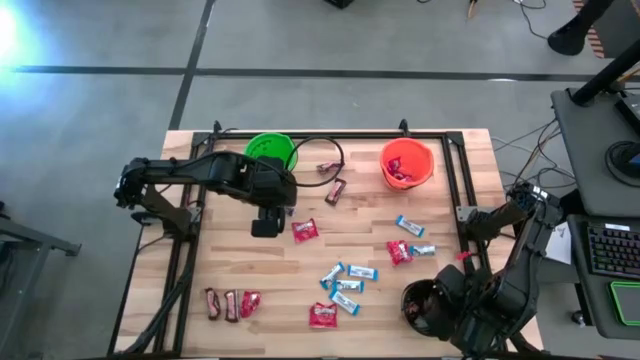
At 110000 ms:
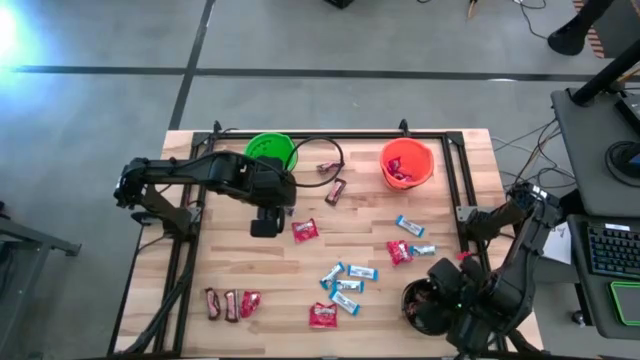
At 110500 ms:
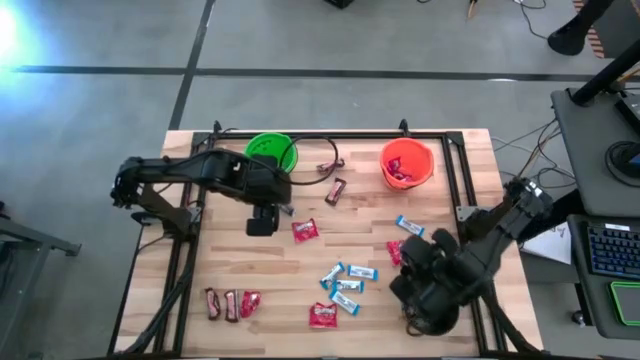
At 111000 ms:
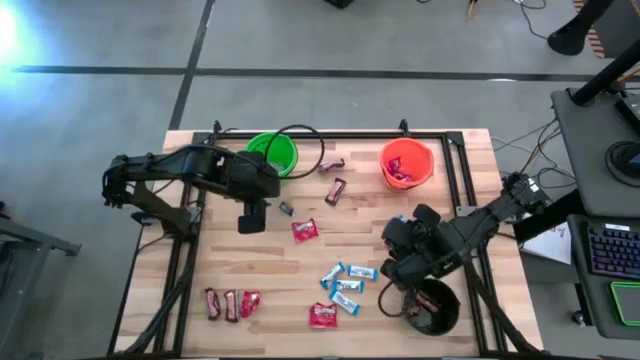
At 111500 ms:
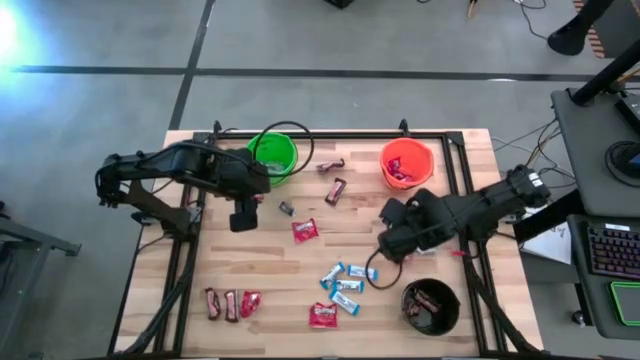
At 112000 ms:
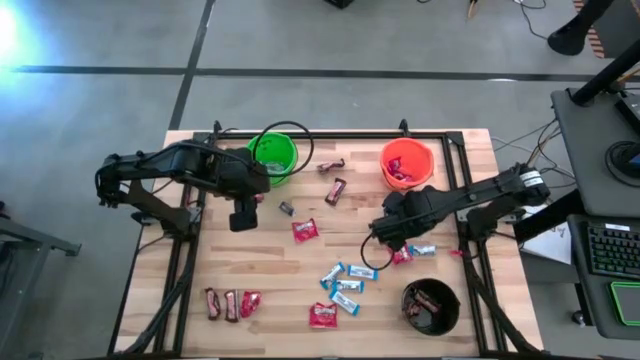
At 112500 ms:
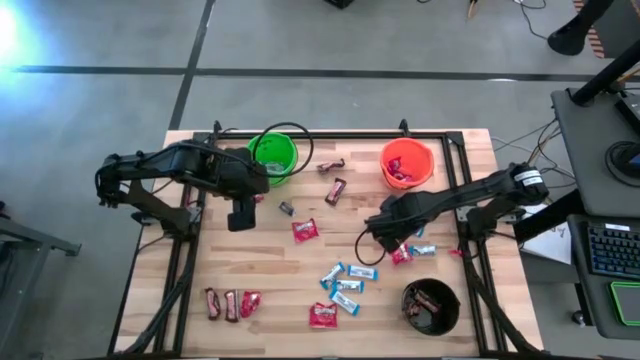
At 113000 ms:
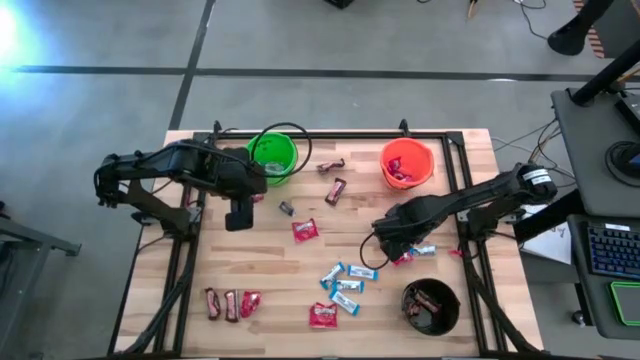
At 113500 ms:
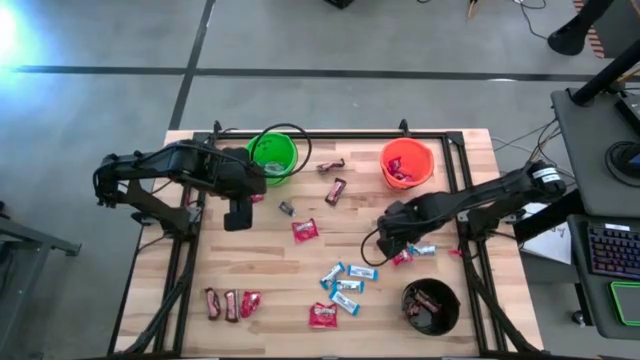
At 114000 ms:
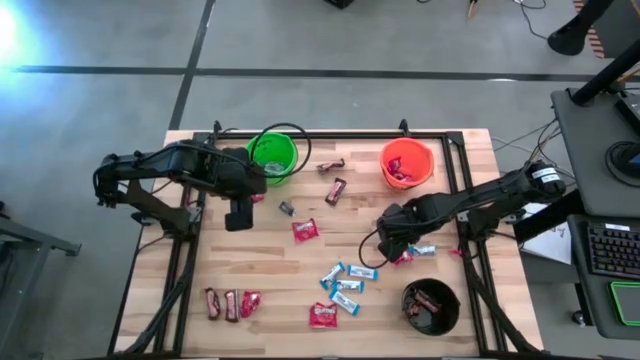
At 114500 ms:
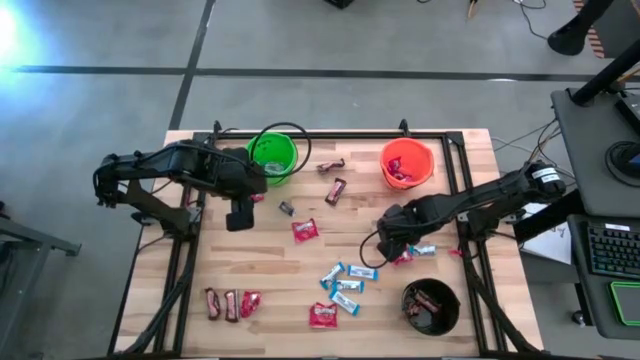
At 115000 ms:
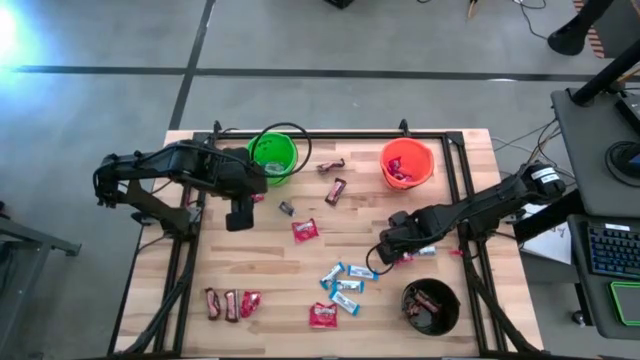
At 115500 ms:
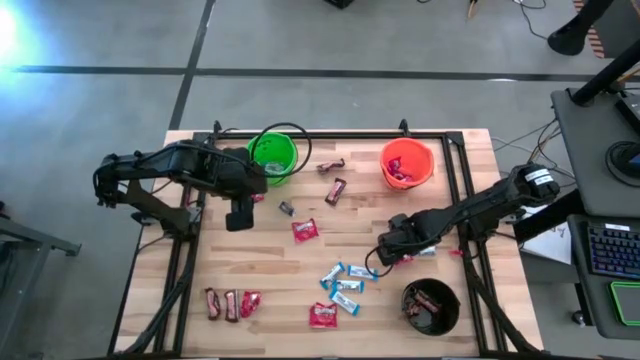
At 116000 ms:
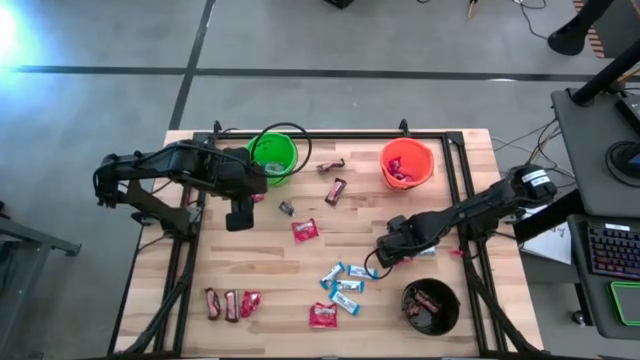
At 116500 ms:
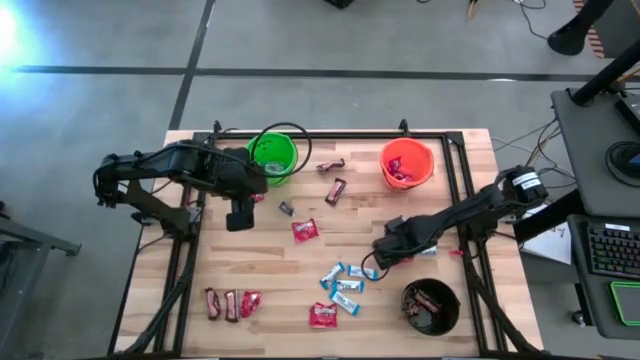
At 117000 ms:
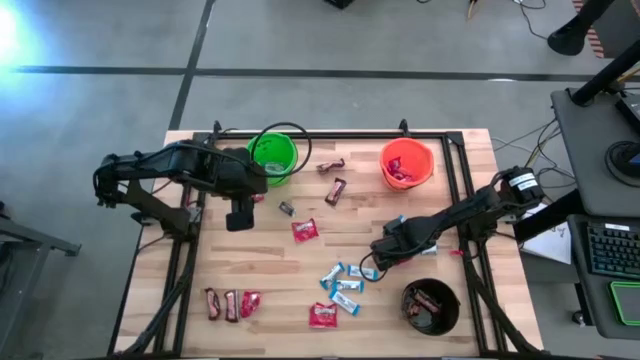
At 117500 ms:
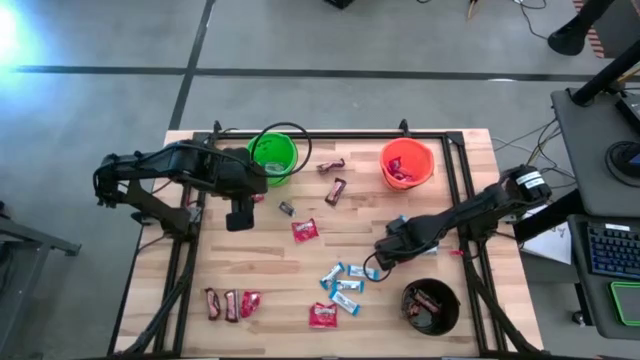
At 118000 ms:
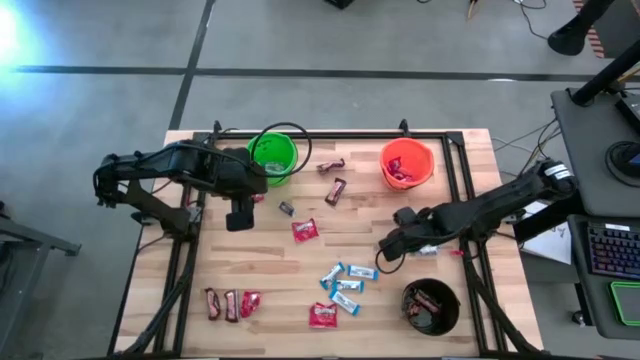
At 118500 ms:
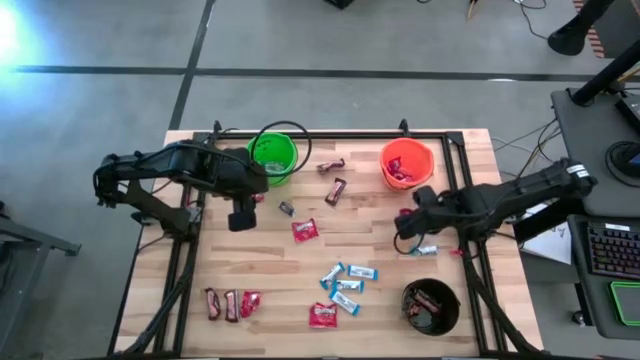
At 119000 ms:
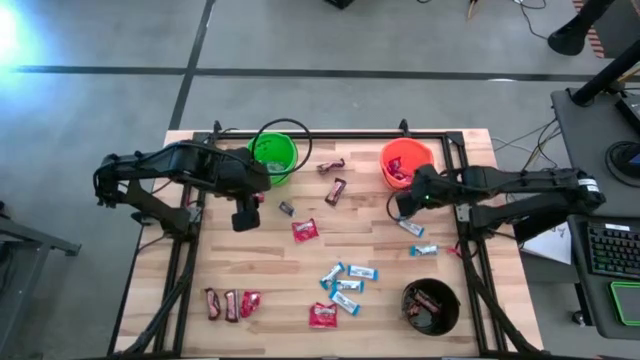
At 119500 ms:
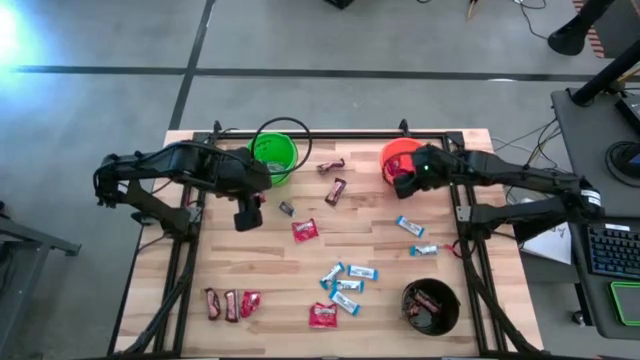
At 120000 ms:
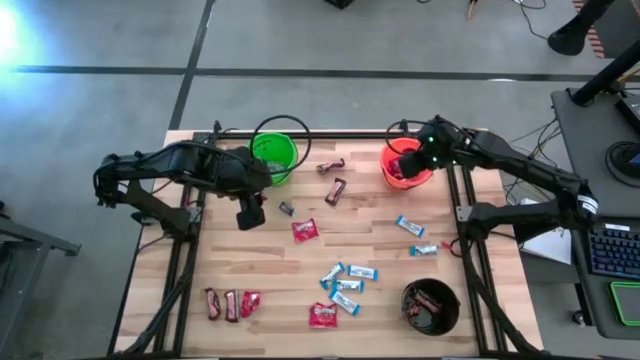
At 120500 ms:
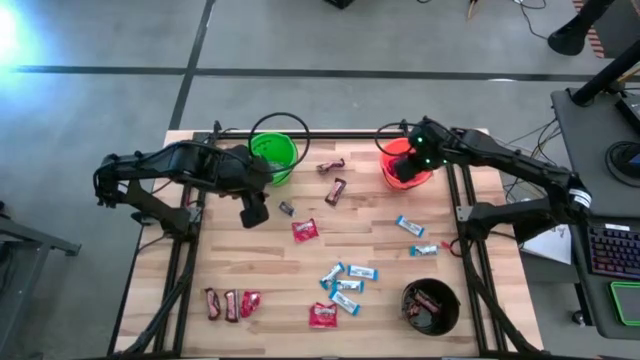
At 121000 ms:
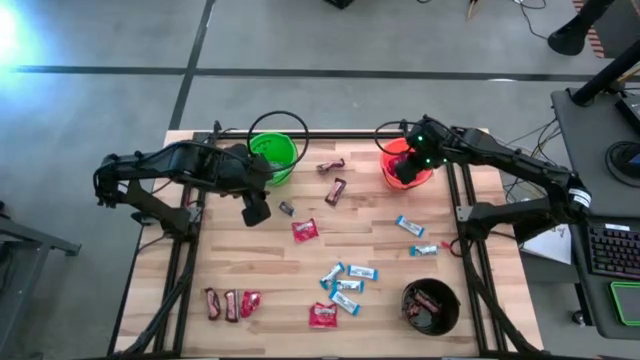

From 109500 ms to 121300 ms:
Task: Sort candy
Put the red candy into the orange bucket

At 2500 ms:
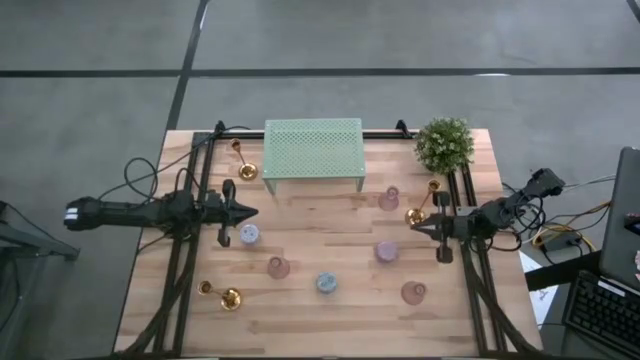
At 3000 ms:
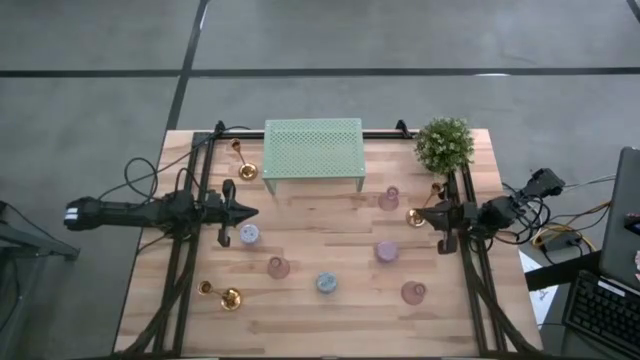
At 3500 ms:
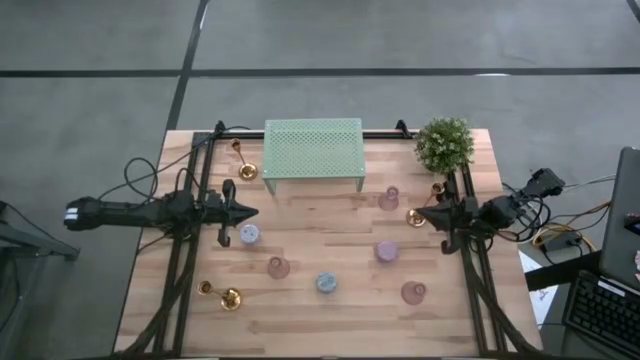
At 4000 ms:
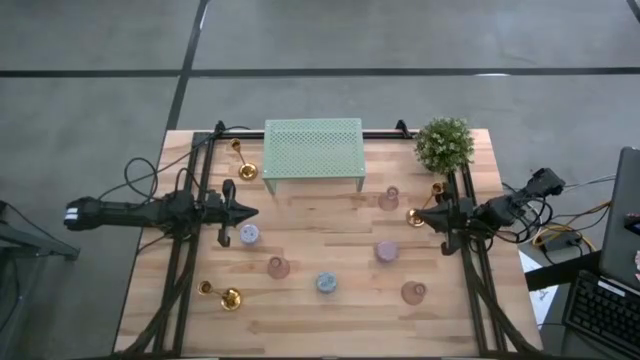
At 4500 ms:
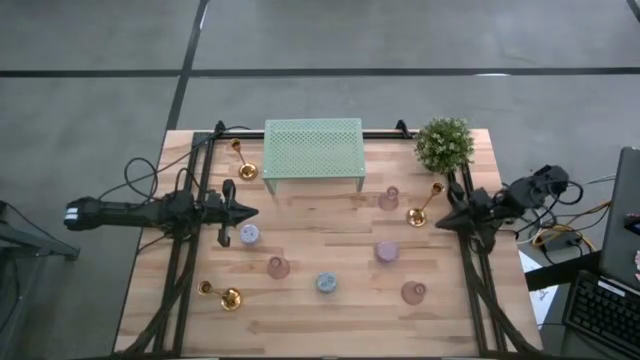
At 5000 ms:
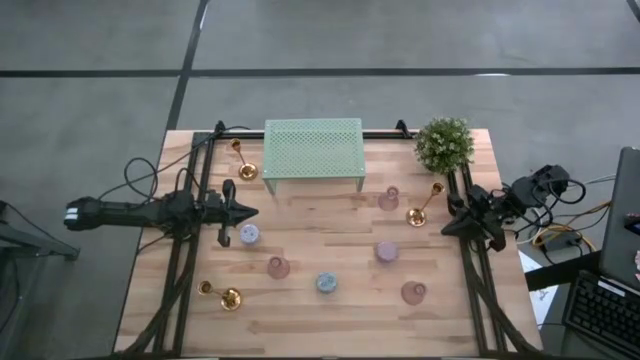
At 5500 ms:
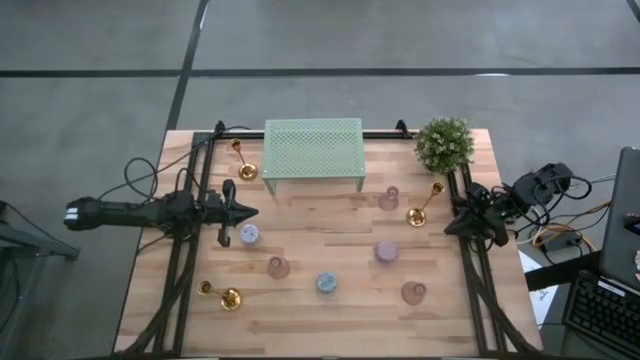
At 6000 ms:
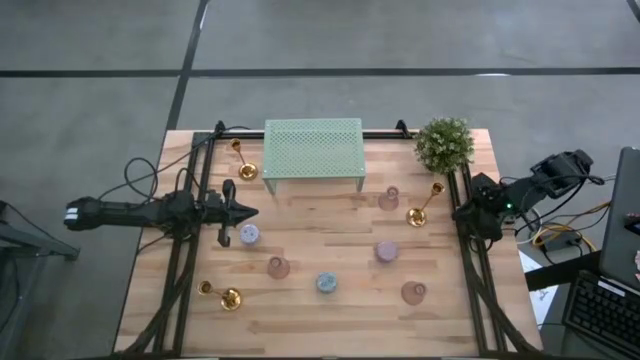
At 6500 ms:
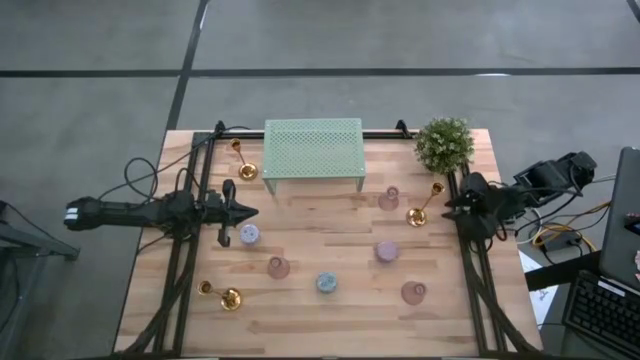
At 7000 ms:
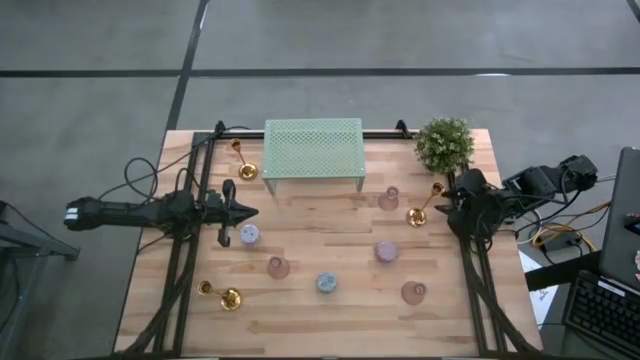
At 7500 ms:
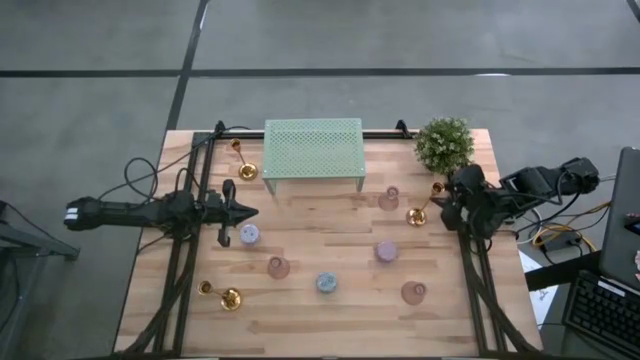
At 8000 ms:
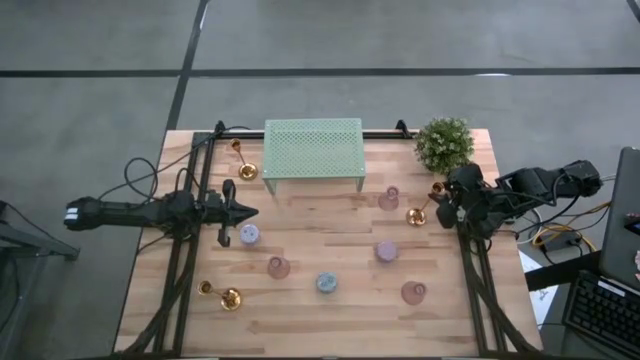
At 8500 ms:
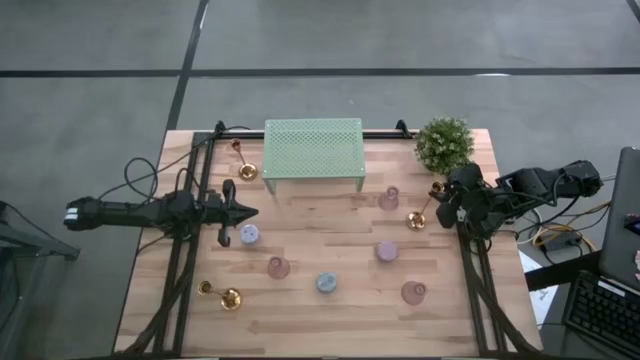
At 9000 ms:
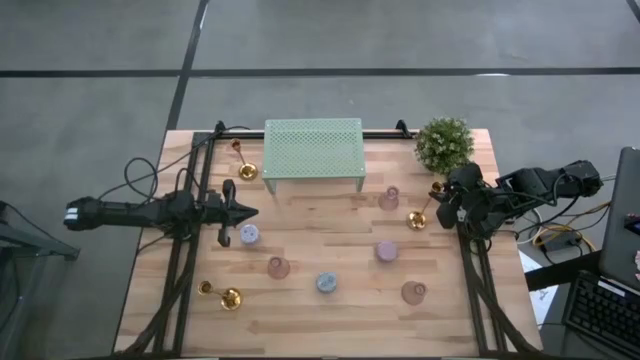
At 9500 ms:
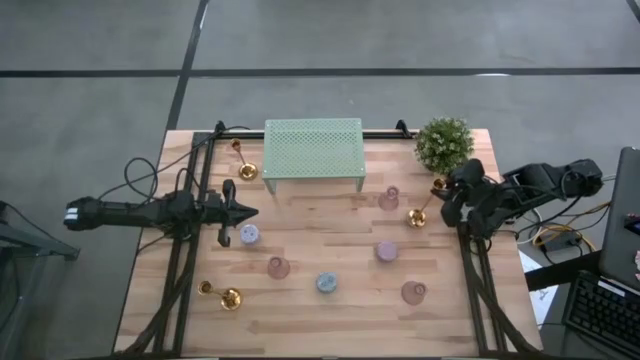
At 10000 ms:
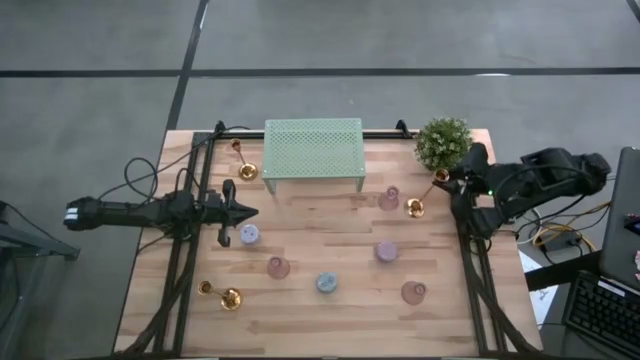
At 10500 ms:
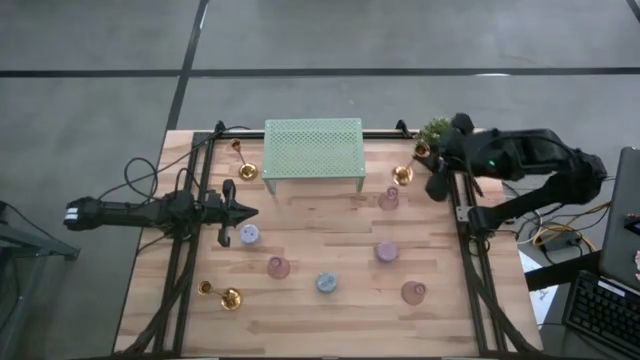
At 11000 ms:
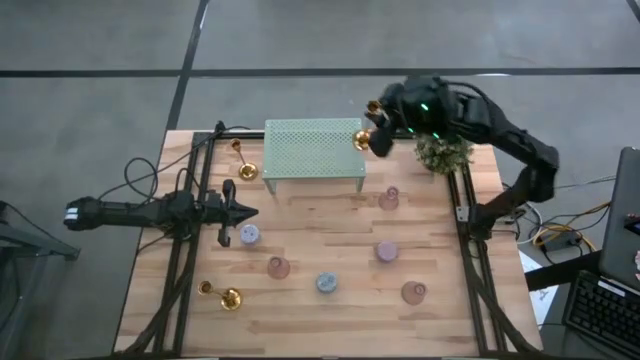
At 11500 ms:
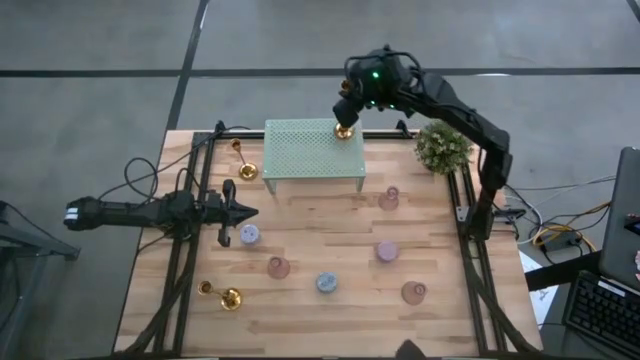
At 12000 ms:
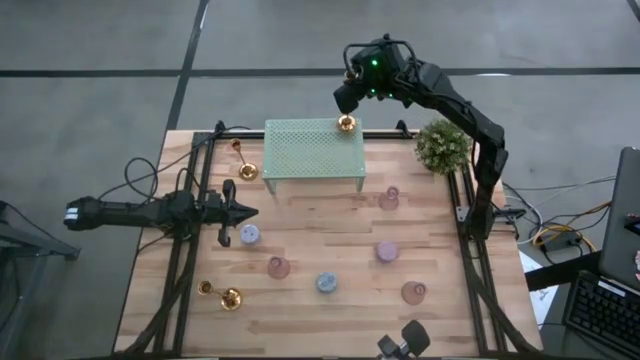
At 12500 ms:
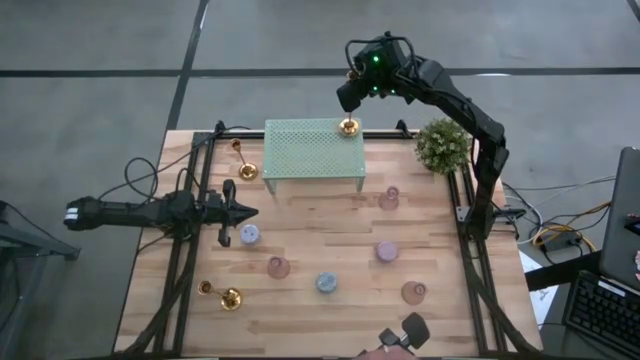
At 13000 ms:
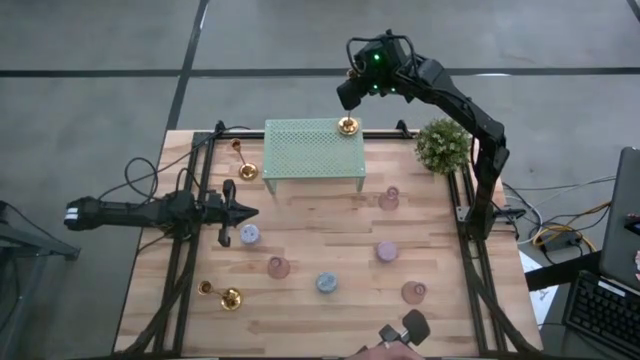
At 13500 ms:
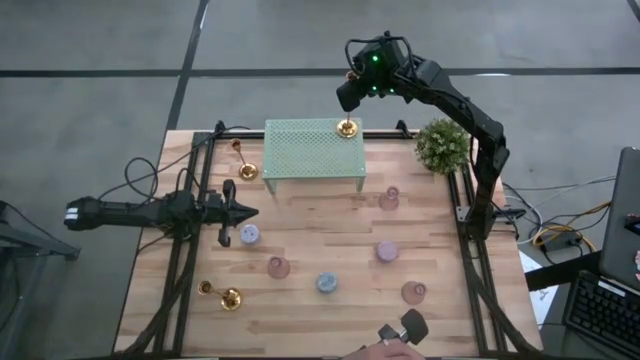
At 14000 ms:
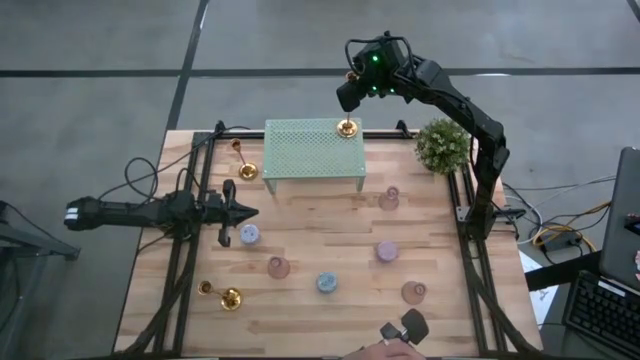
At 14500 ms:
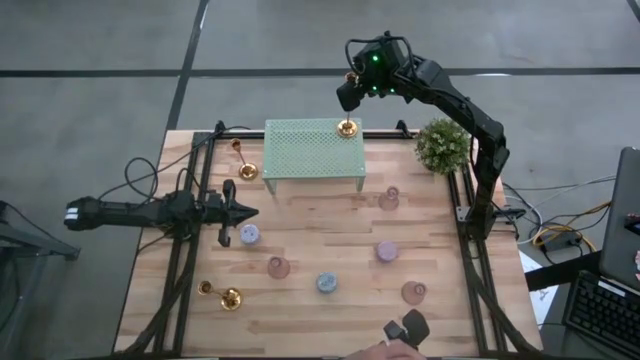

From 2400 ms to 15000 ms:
Task: Pick & Place candle stick holders
Put the right gold candle holder on the shelf
